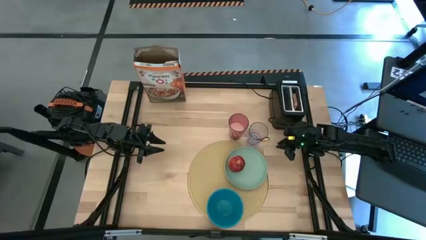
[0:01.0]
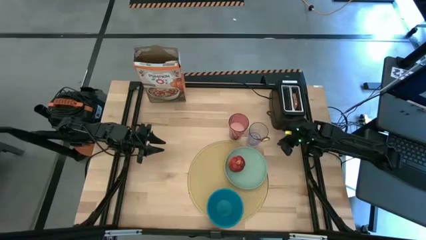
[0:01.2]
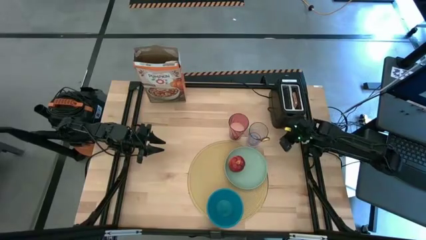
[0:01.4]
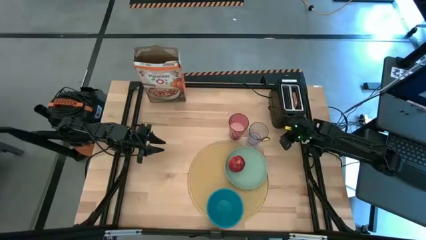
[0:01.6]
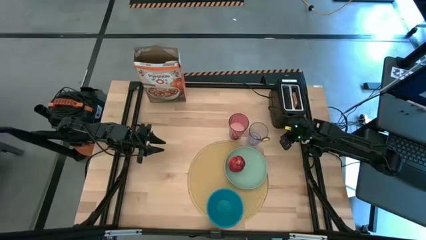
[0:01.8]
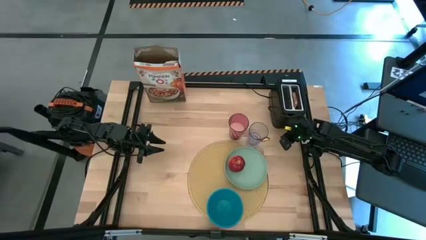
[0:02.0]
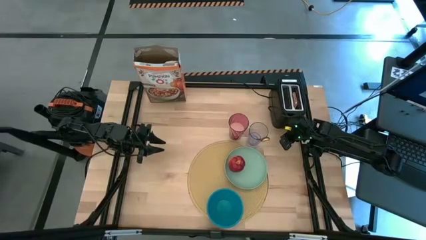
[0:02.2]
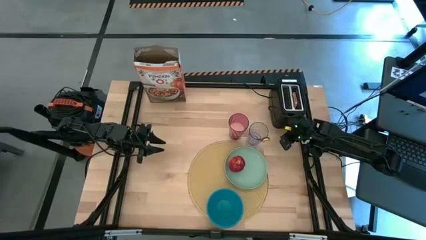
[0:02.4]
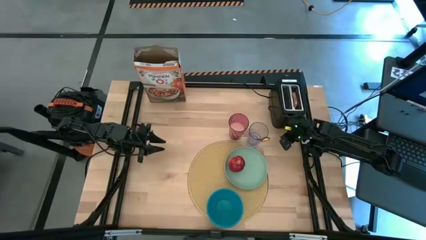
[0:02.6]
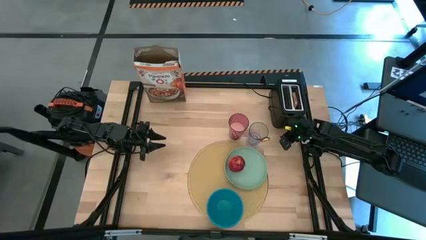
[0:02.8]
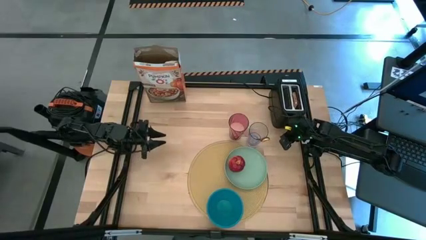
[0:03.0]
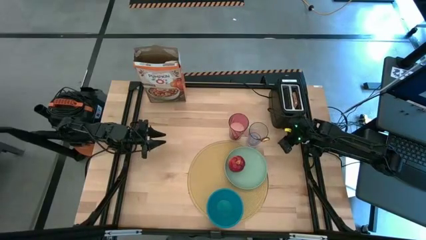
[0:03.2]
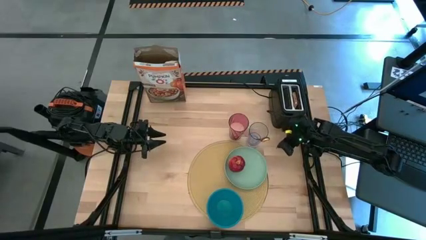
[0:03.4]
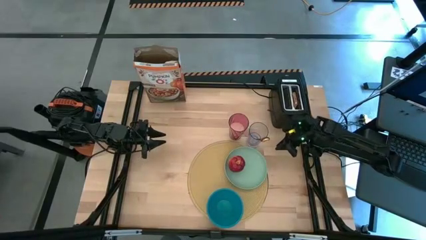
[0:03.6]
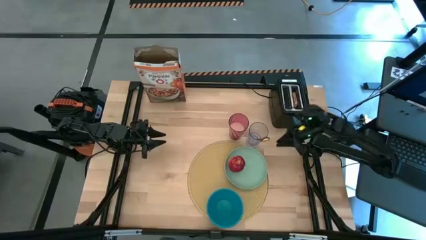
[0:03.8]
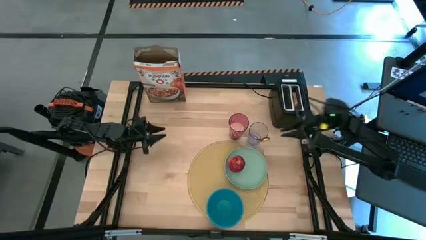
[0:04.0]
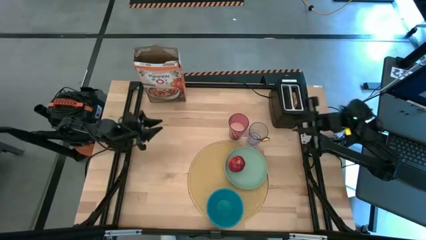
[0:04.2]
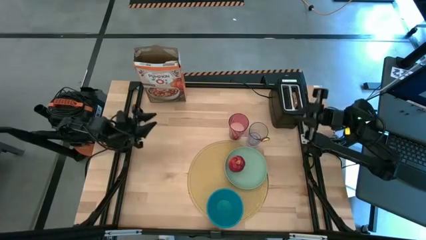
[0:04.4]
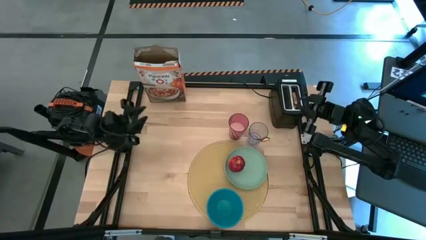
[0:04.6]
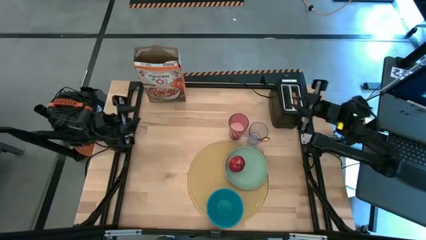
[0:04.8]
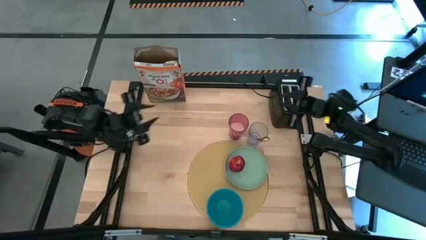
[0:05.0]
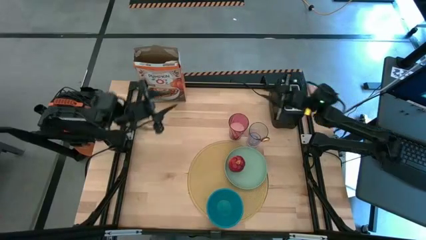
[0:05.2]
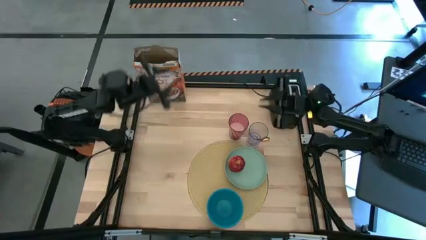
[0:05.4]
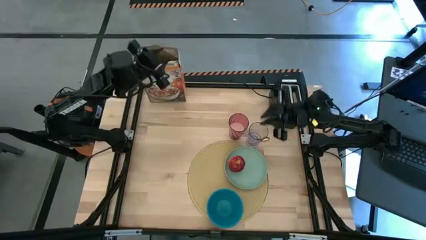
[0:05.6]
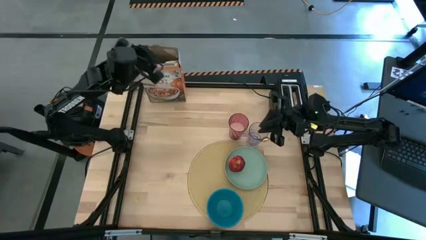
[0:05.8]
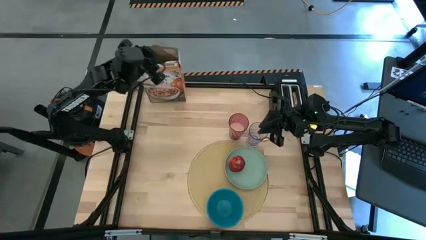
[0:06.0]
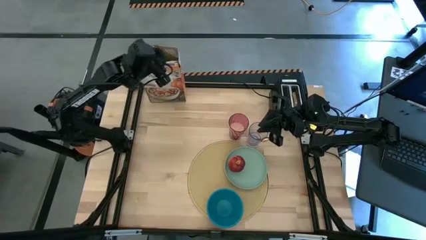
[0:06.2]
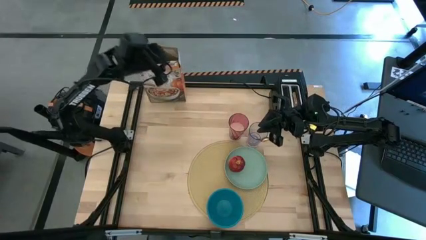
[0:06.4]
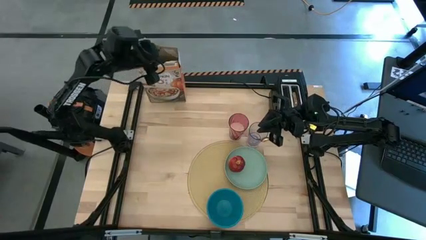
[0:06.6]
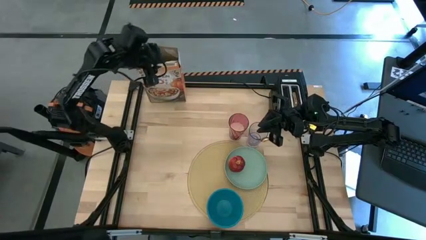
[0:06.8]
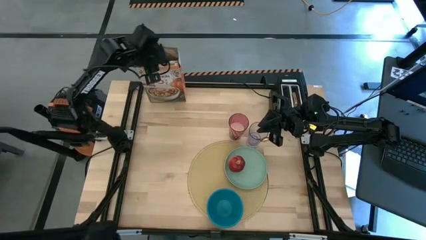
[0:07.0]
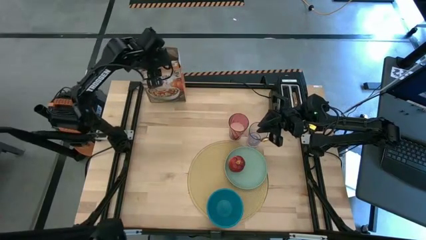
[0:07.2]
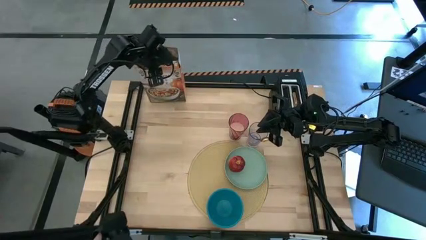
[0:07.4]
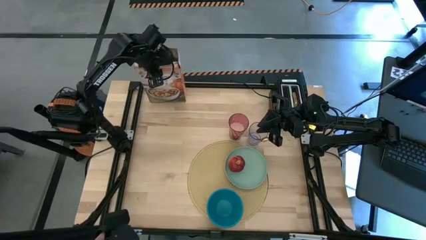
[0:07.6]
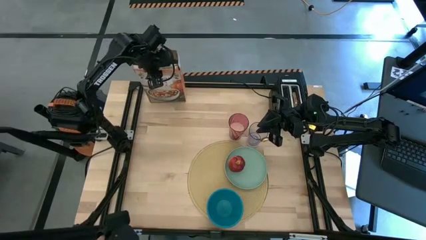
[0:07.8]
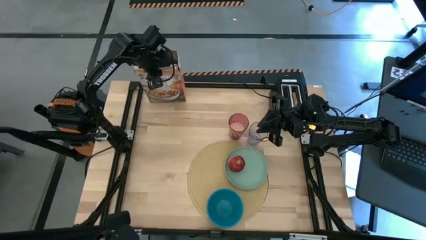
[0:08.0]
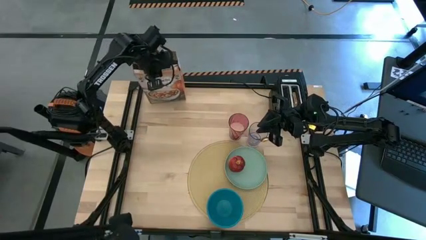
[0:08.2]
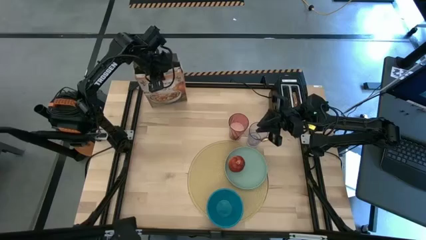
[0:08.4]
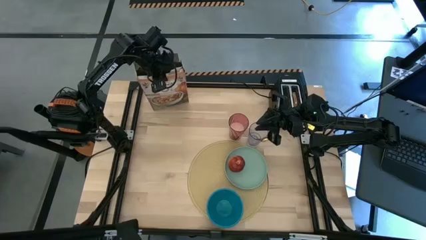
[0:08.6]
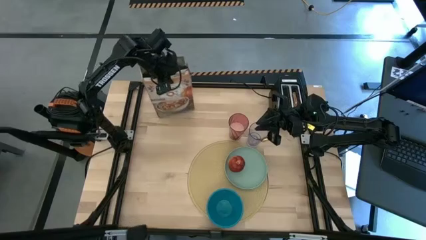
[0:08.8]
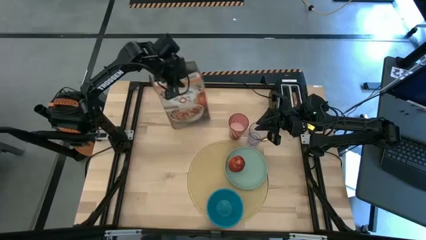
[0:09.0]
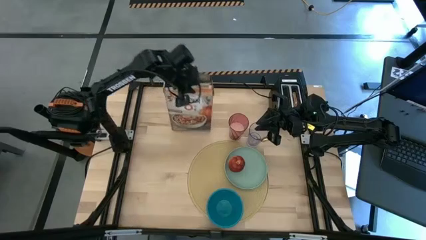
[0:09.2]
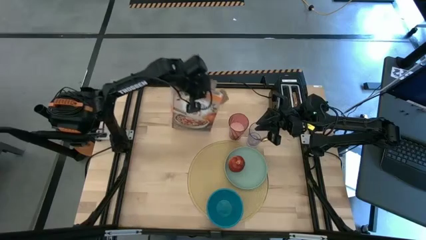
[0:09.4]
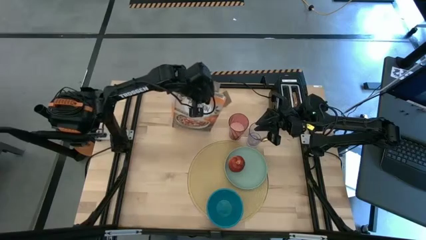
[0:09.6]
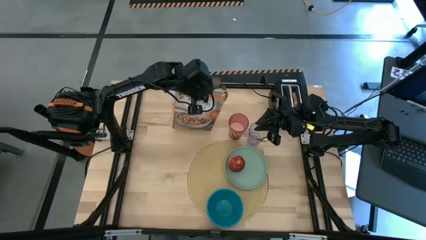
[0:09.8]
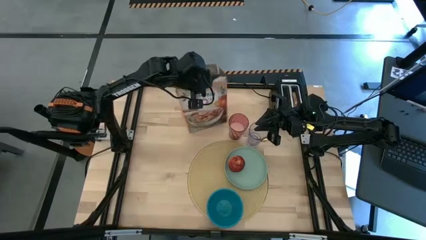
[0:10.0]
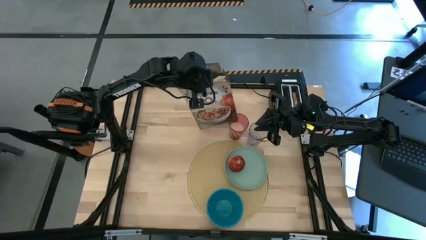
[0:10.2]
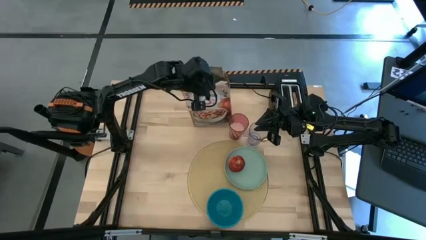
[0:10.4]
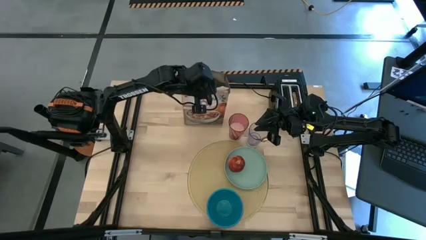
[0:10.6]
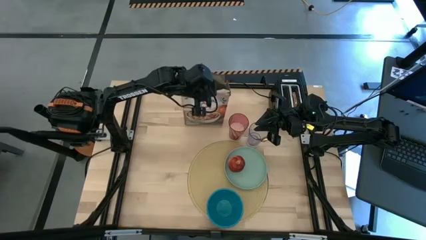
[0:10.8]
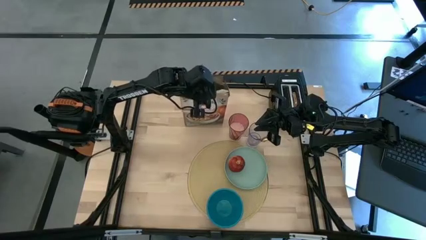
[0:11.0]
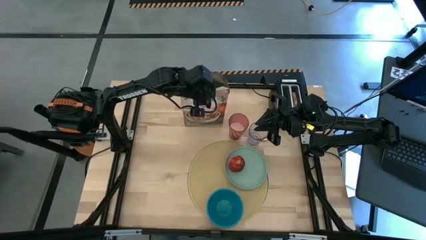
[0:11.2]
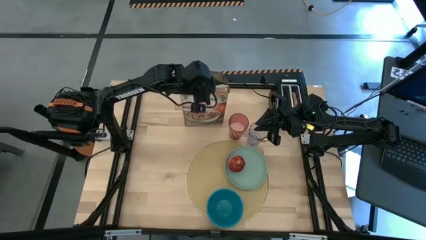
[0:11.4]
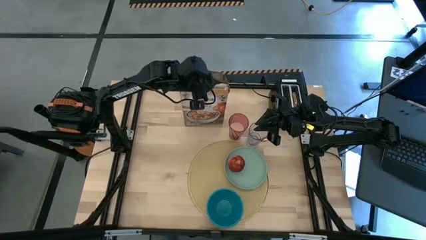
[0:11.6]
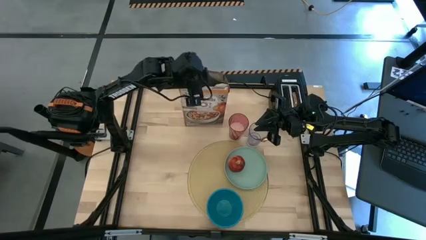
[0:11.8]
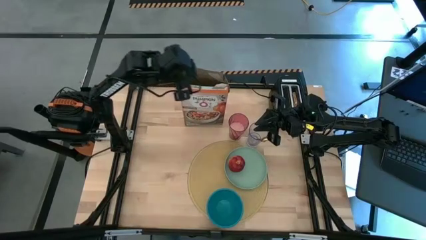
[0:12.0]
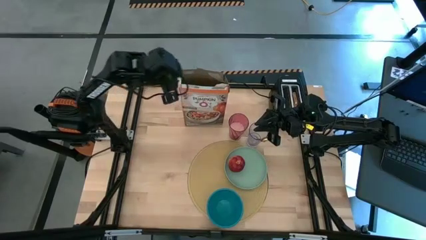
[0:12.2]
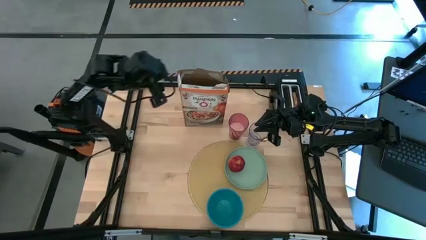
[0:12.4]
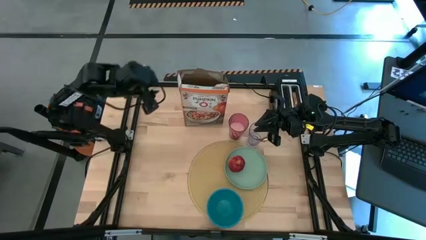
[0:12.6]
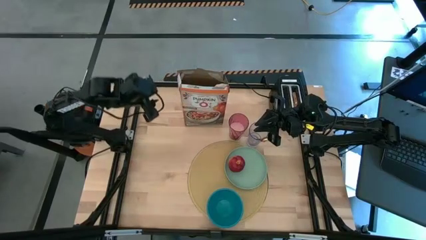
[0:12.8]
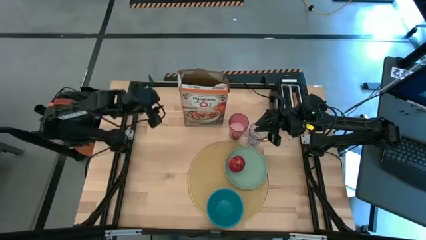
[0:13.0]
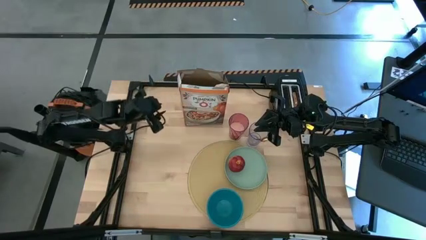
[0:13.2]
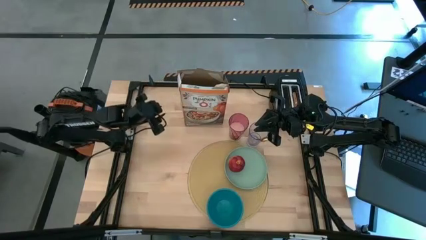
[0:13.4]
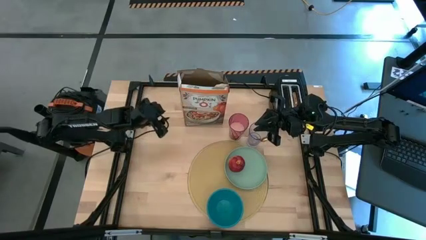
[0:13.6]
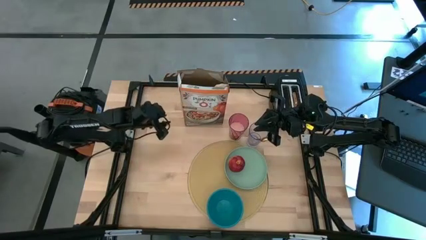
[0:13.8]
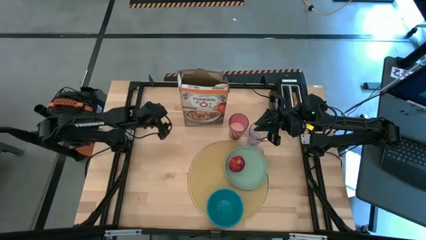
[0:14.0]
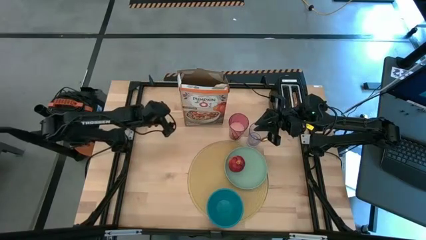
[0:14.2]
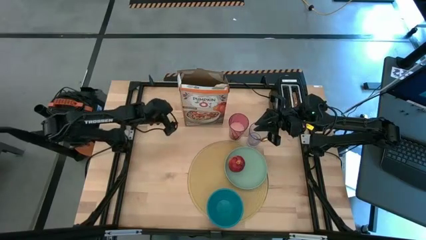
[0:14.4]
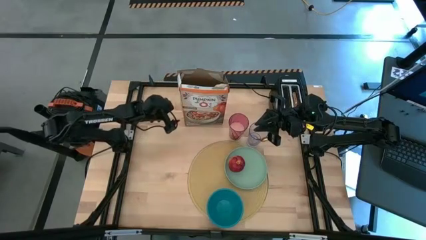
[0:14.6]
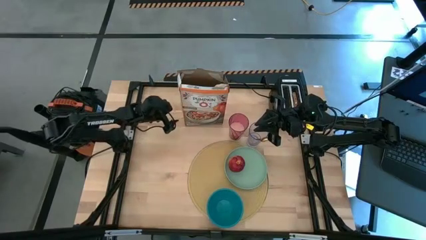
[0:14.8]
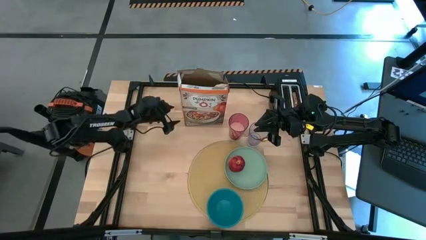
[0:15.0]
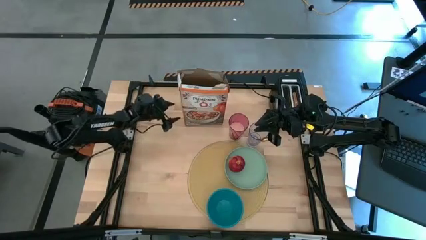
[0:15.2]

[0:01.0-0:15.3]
Task: Arrange a breakfast setting
Move the cereal box to the center

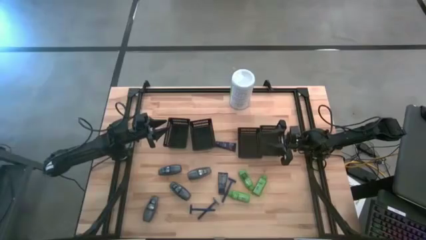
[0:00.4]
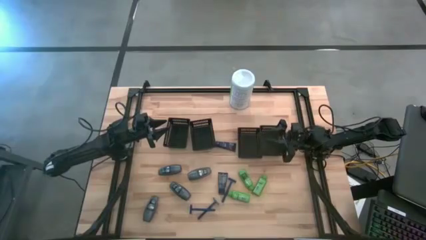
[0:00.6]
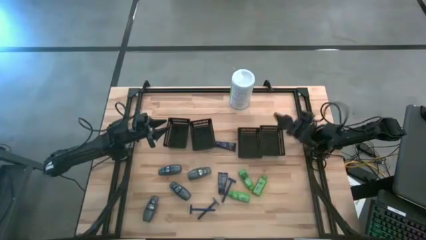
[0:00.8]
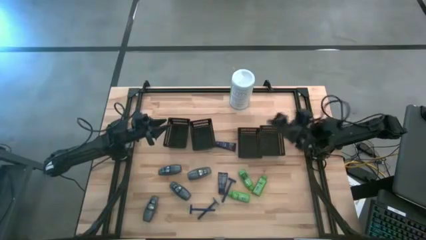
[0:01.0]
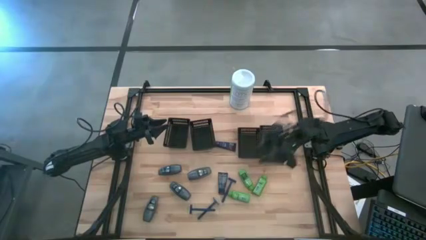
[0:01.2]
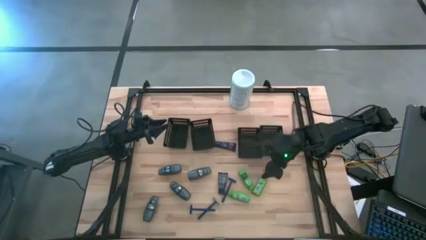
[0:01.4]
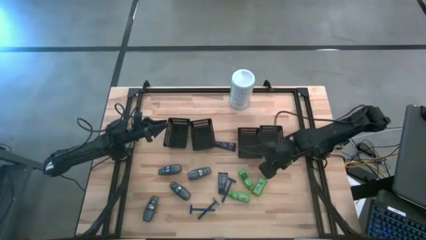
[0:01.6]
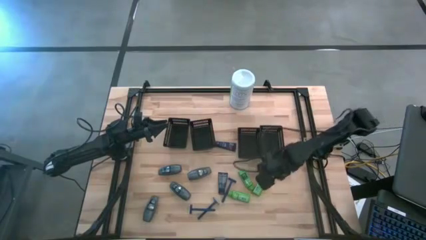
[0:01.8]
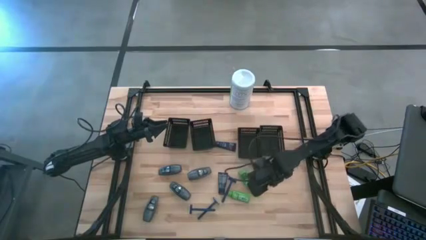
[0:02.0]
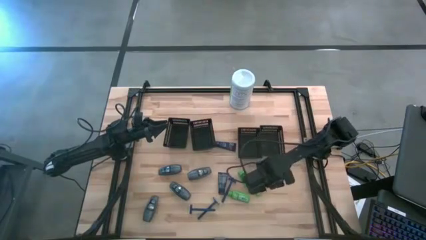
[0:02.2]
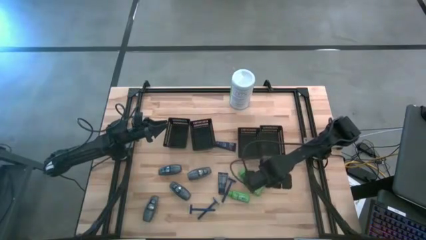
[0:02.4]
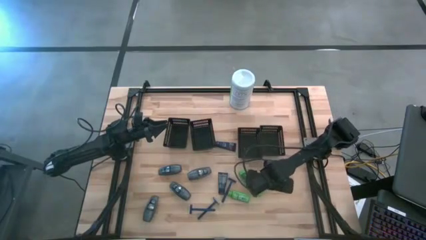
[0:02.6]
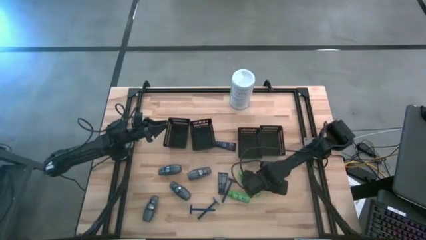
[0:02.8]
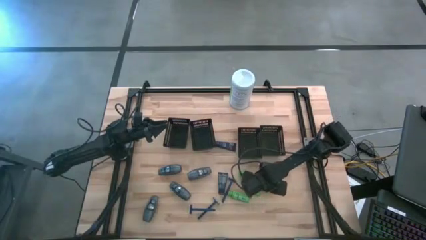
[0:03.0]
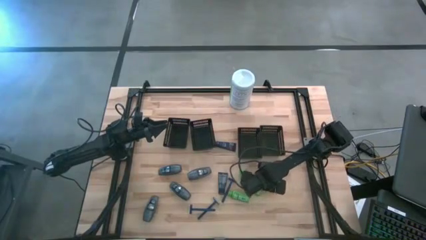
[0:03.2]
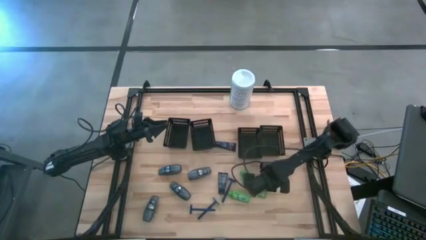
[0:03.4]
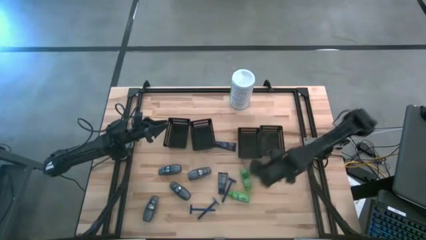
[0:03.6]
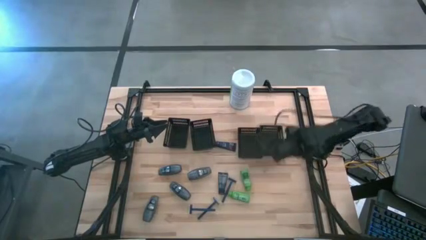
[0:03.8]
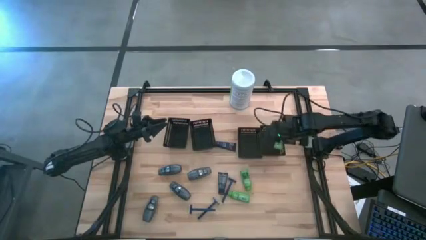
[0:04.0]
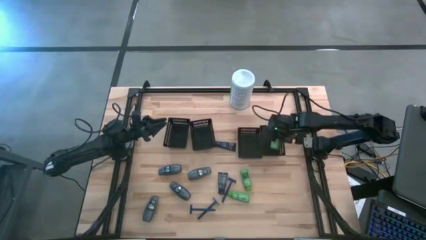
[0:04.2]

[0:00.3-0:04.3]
Task: Pick & Place Travel size toiletries
Put the green shampoo into the right black bin
